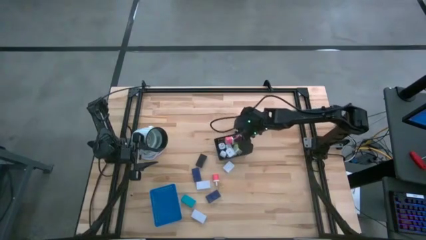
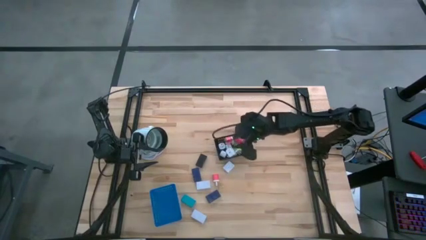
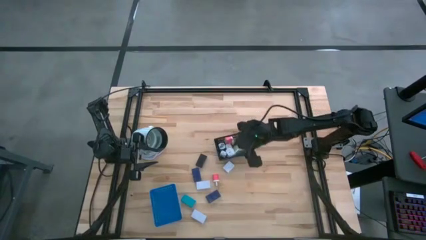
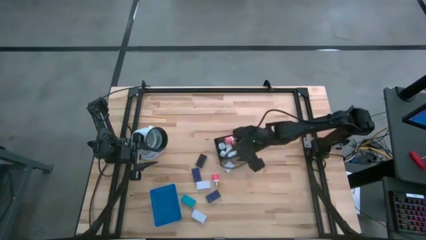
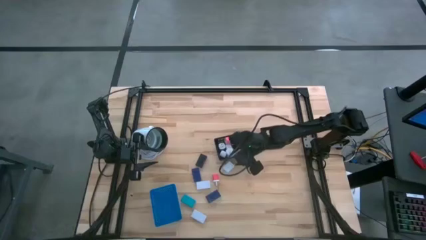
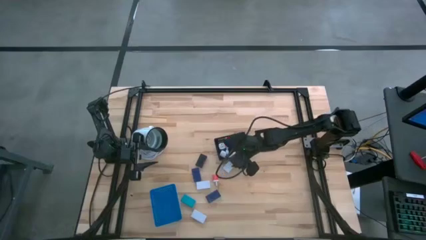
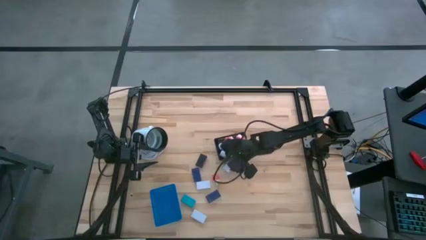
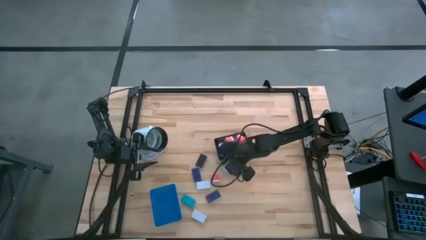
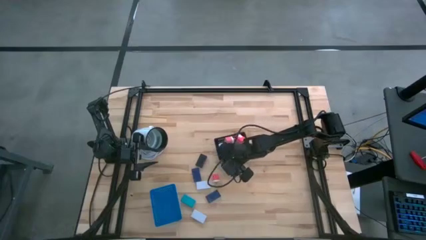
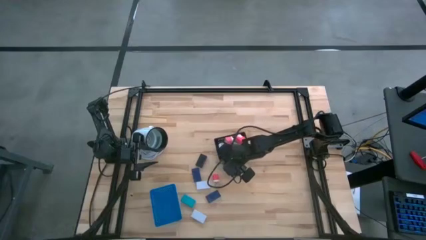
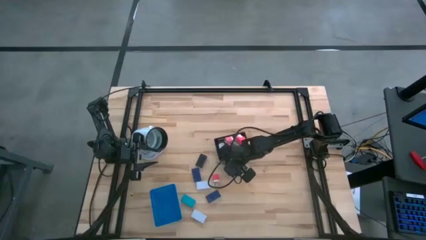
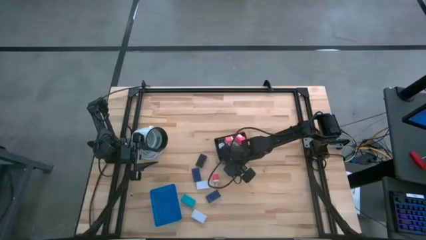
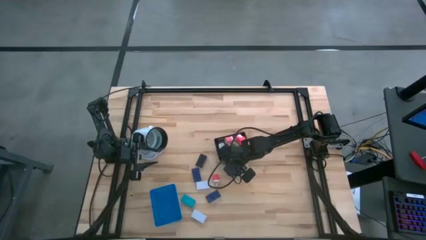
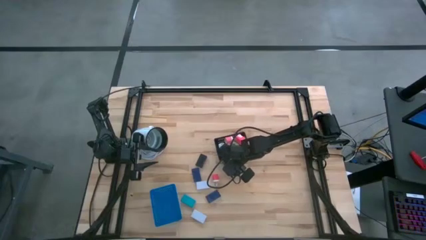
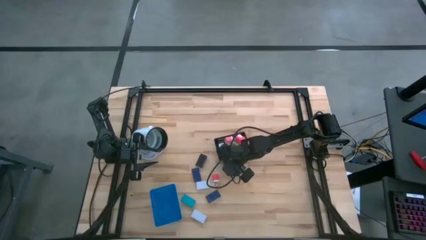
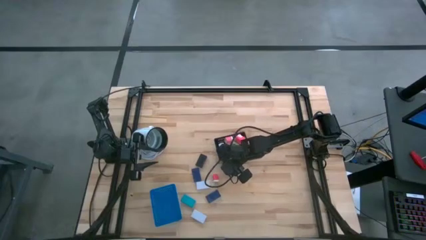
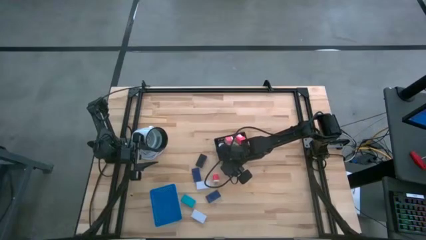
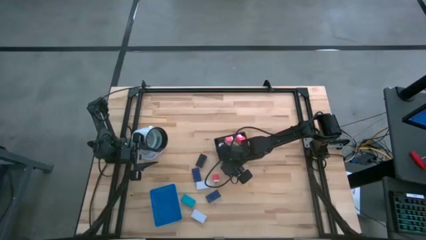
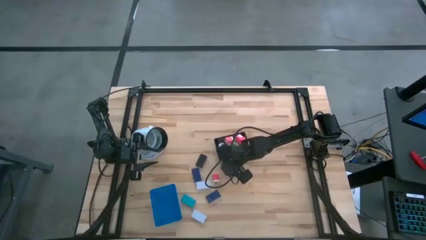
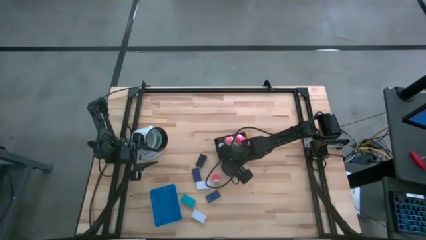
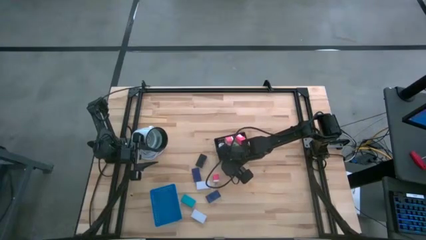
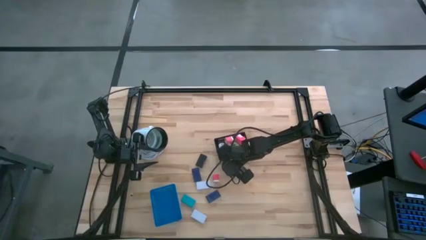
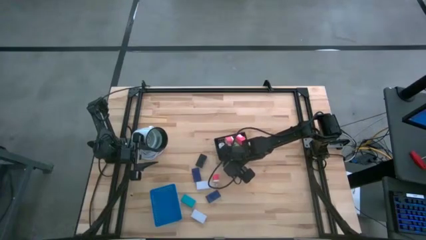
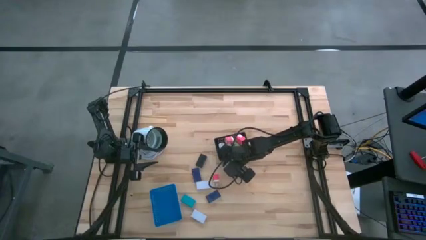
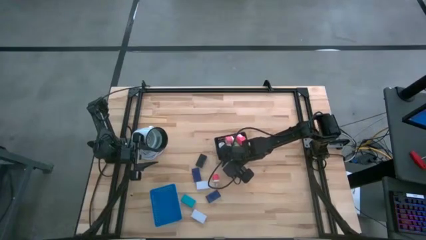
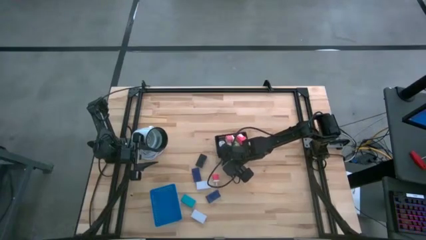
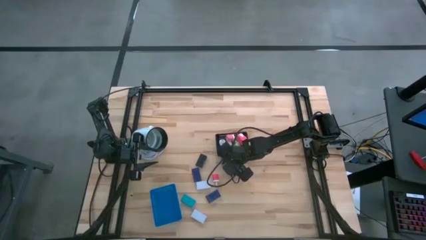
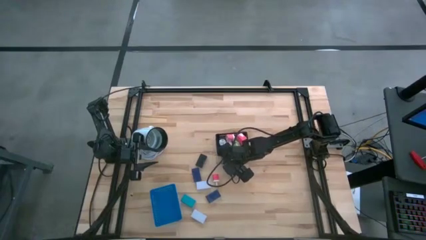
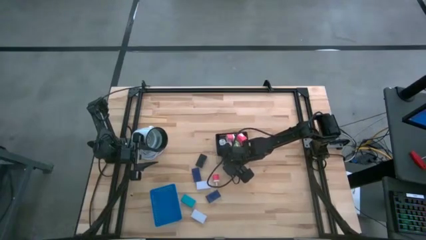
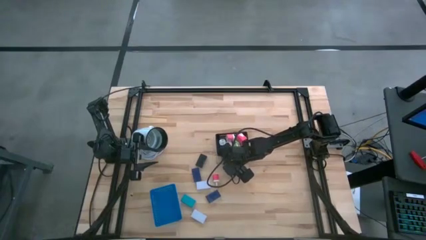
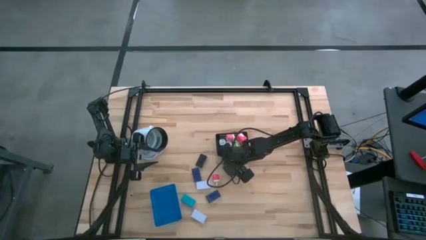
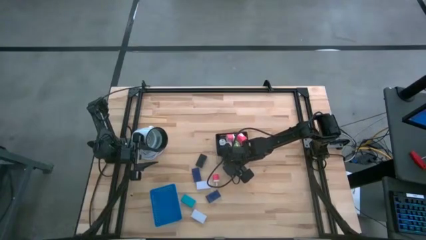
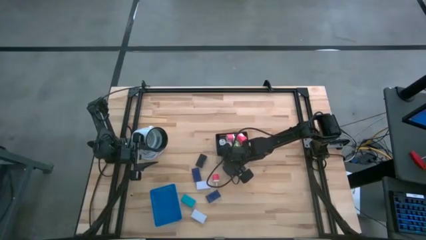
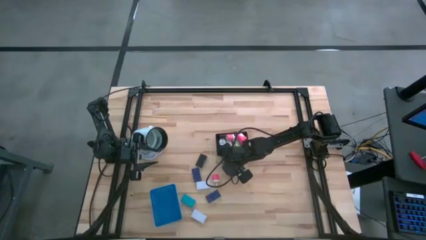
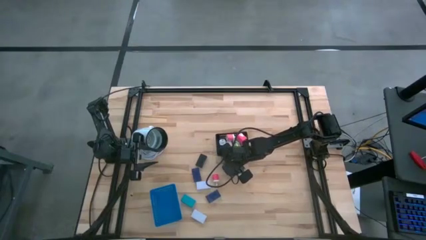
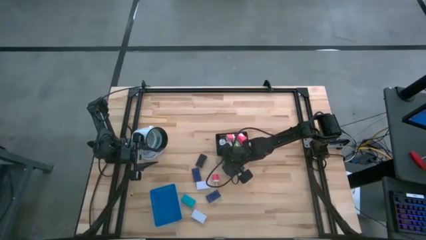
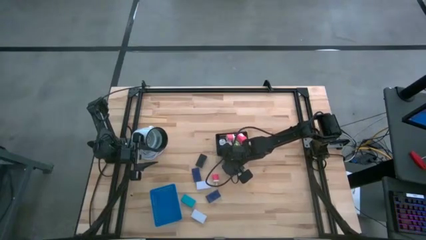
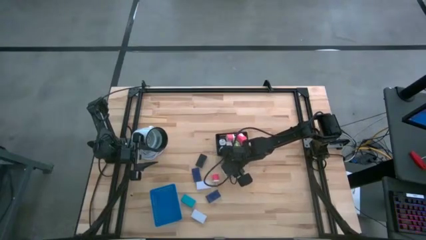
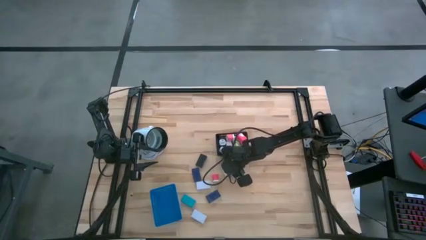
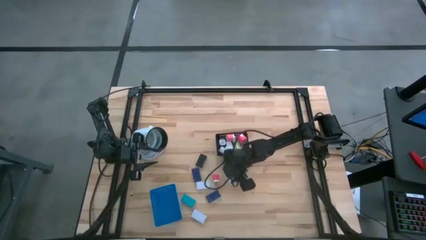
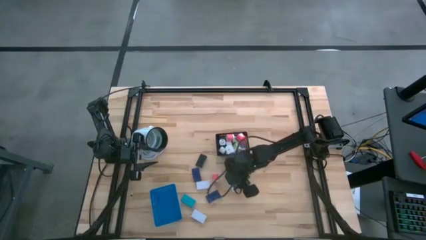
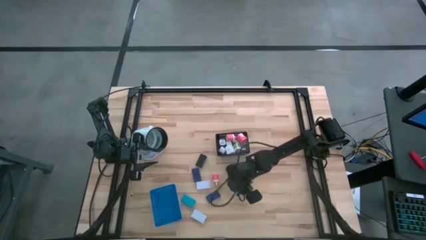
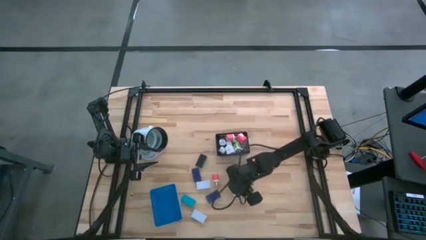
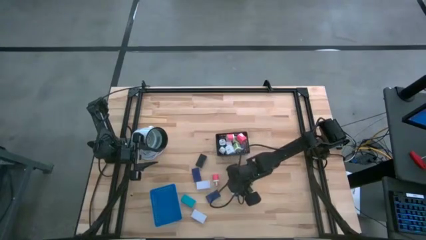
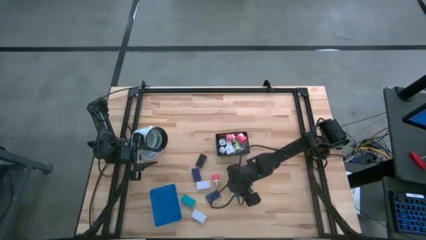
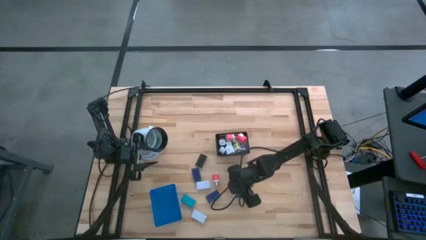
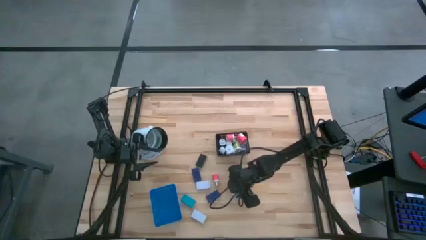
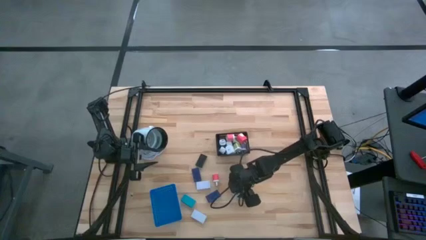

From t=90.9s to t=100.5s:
Task: Pick & Place Office items
Put the white charger adapter into the black bin

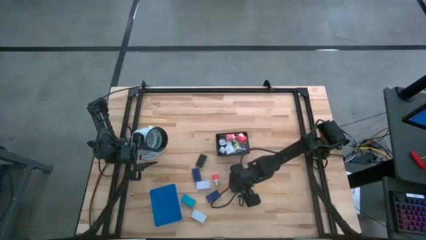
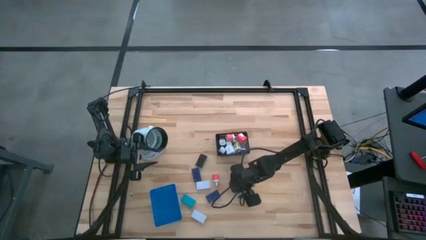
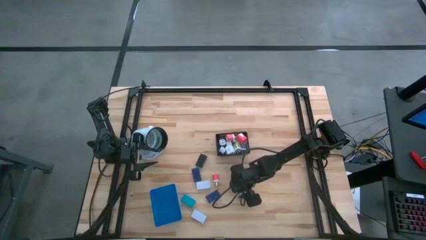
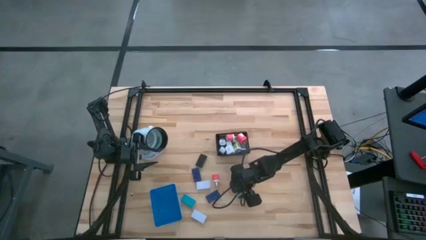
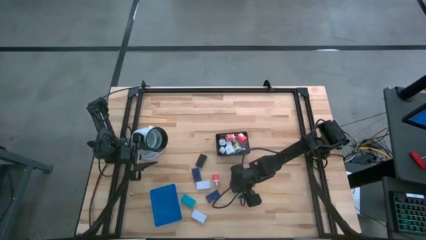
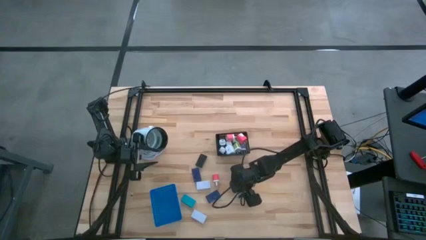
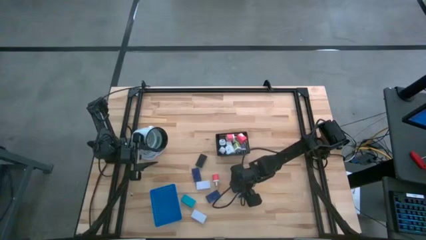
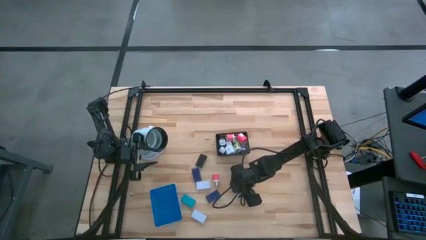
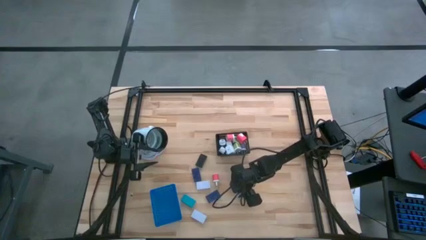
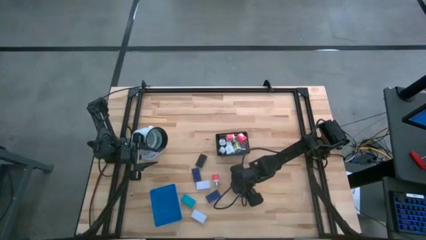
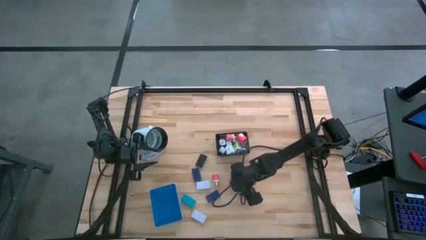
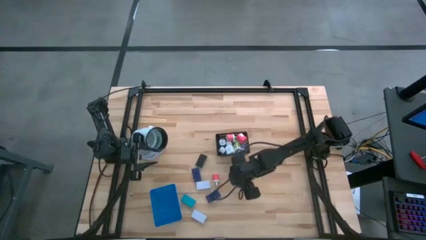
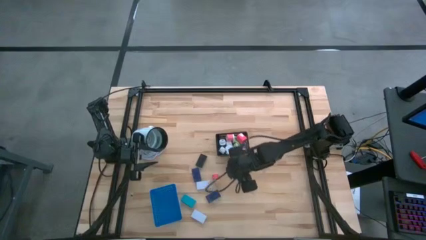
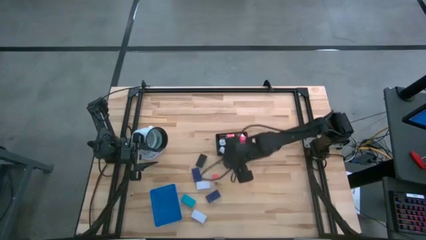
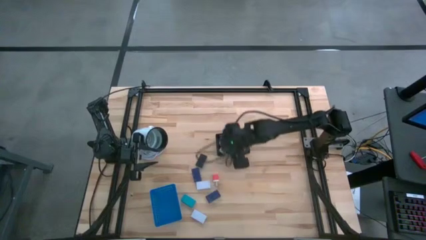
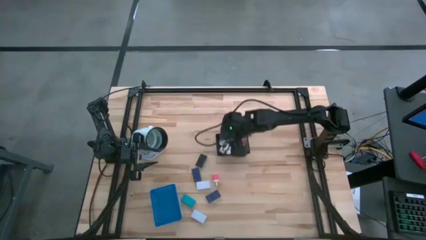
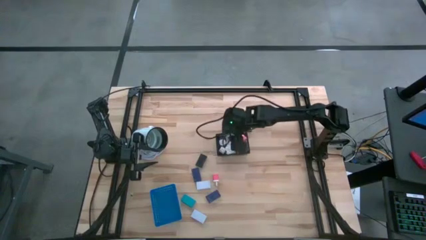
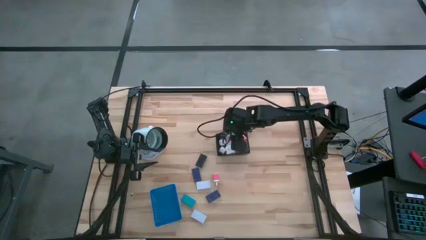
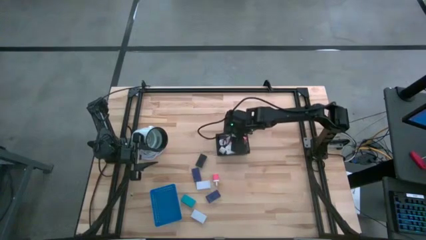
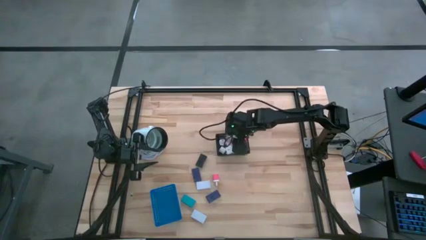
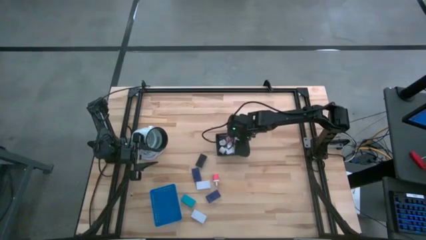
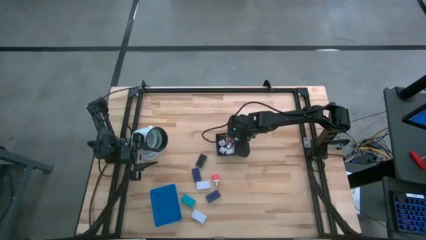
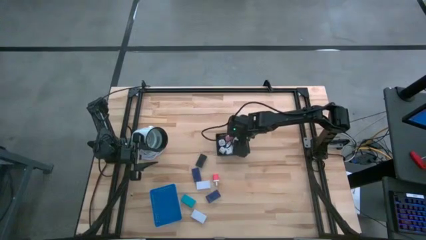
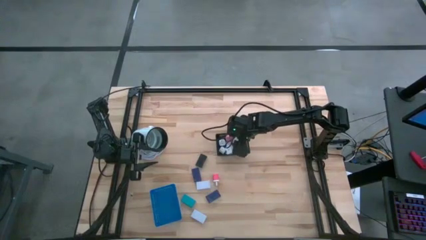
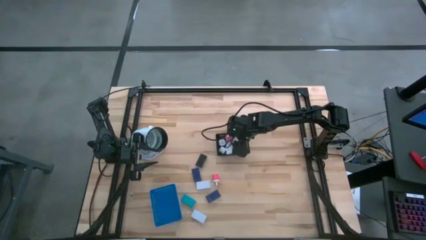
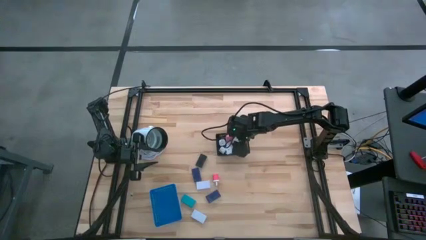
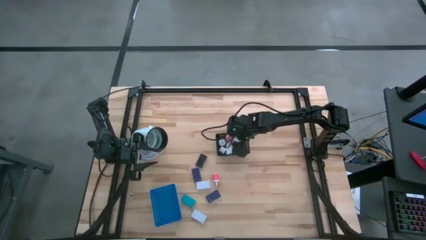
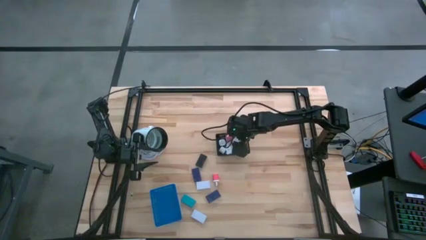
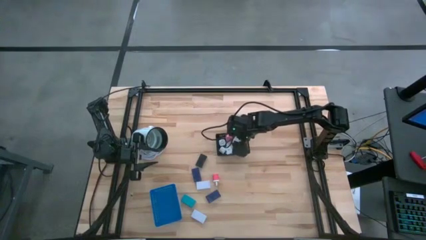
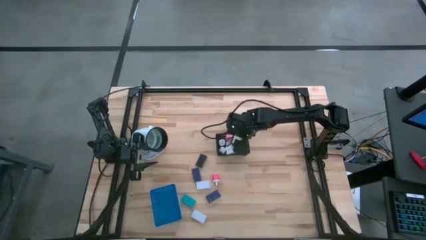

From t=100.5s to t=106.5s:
Put the white charger adapter into the black bin
